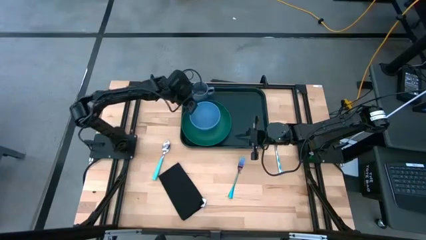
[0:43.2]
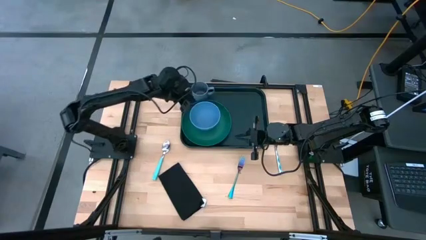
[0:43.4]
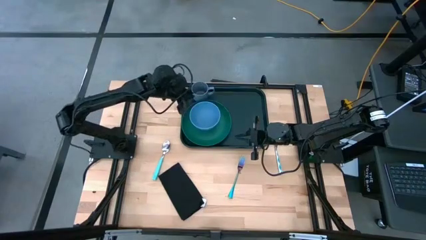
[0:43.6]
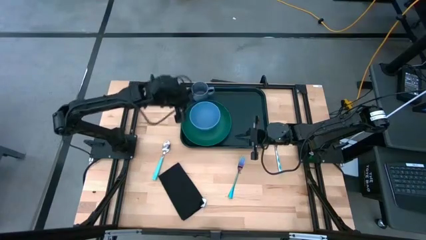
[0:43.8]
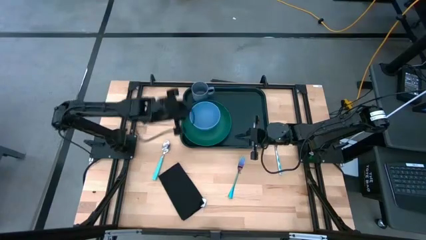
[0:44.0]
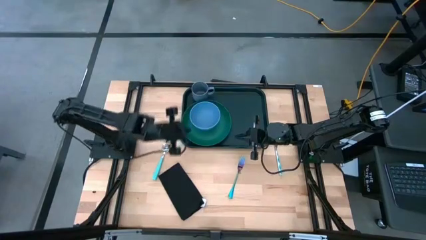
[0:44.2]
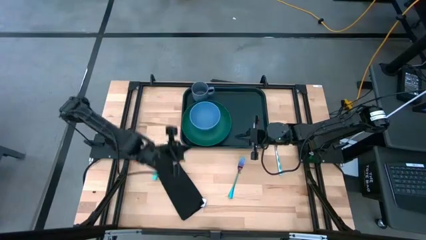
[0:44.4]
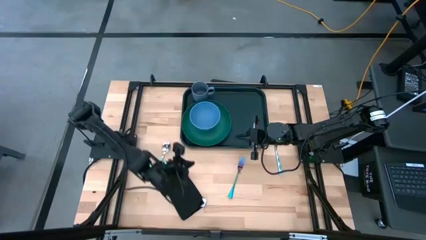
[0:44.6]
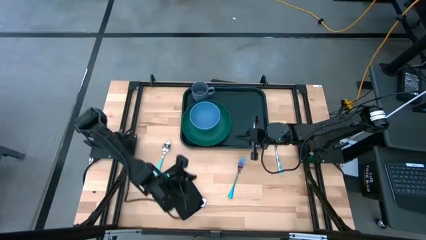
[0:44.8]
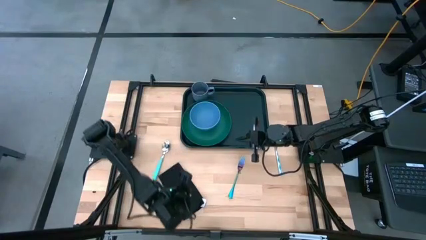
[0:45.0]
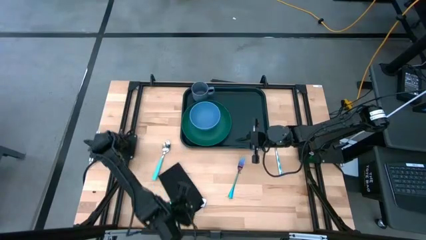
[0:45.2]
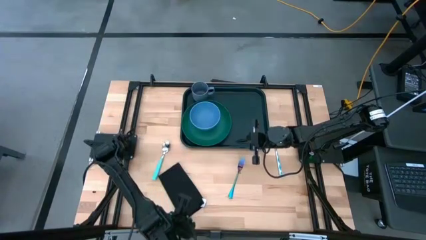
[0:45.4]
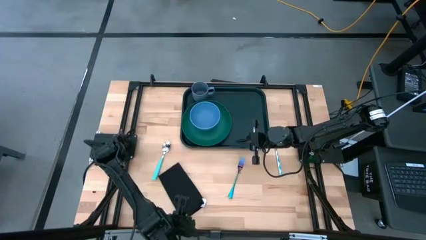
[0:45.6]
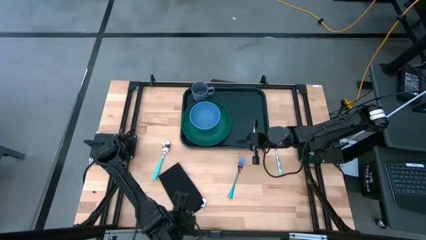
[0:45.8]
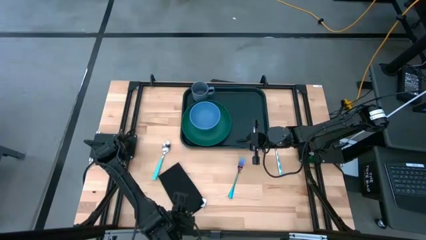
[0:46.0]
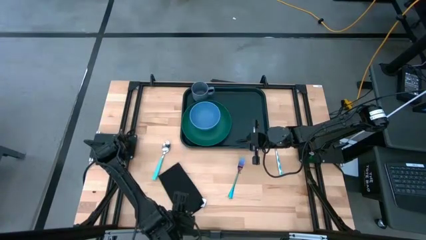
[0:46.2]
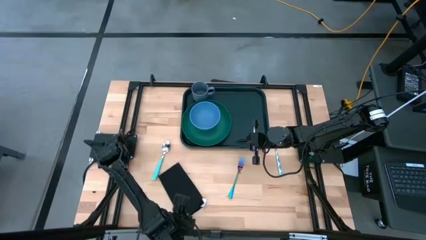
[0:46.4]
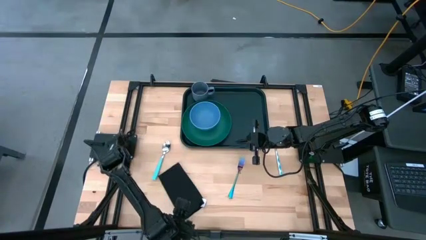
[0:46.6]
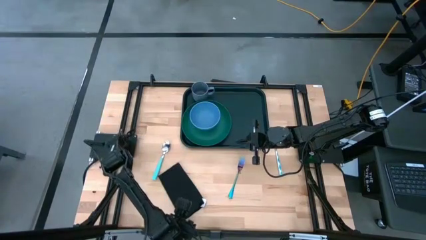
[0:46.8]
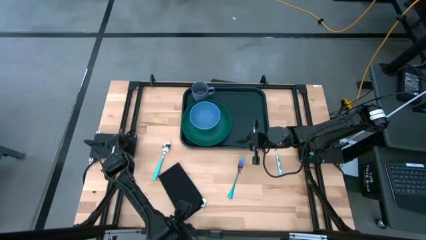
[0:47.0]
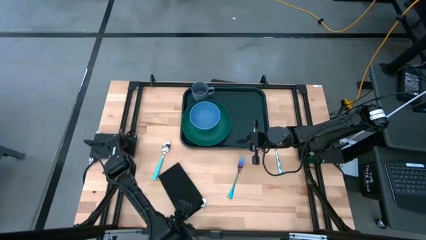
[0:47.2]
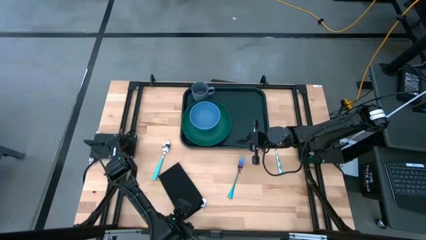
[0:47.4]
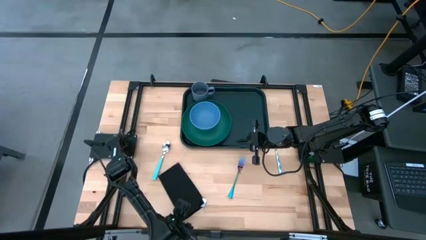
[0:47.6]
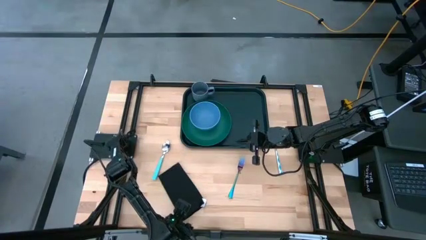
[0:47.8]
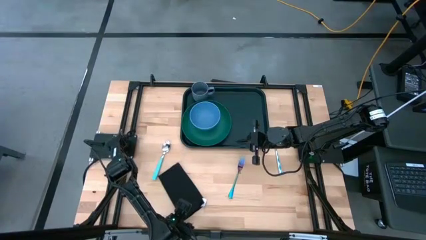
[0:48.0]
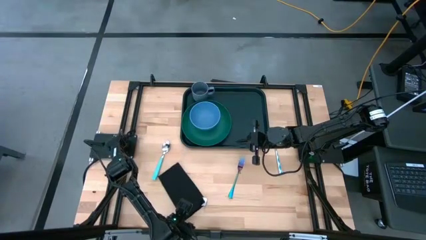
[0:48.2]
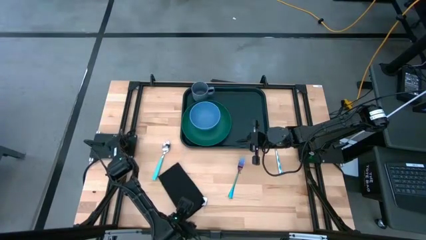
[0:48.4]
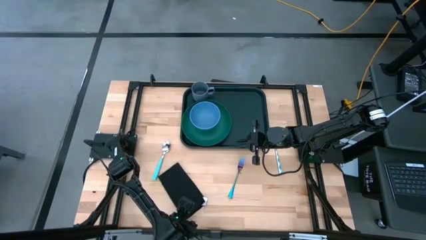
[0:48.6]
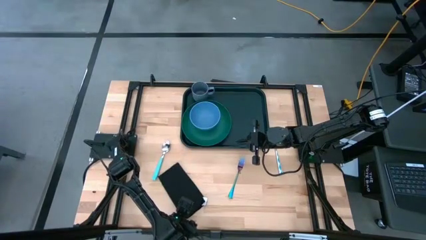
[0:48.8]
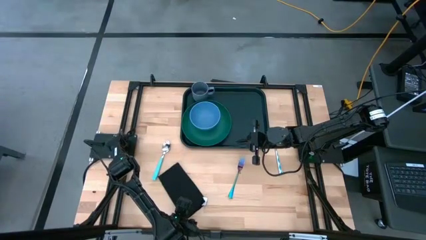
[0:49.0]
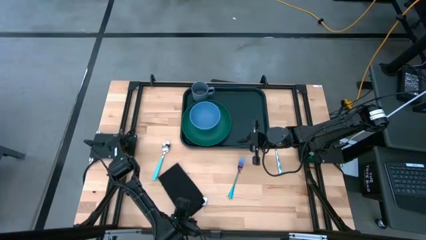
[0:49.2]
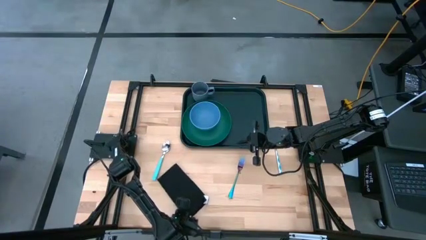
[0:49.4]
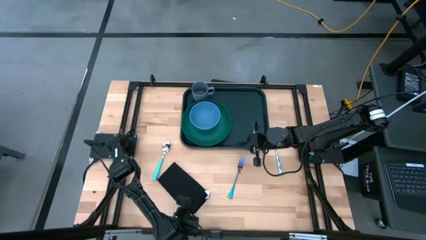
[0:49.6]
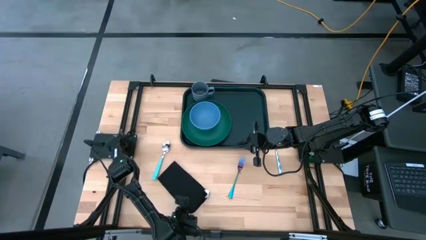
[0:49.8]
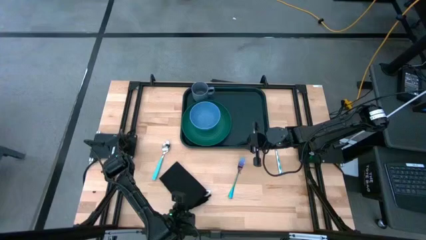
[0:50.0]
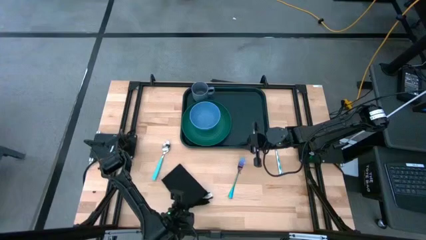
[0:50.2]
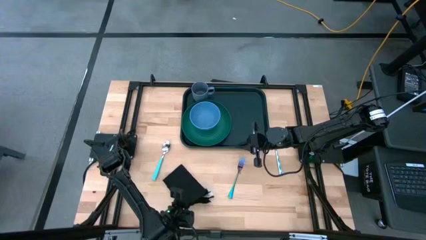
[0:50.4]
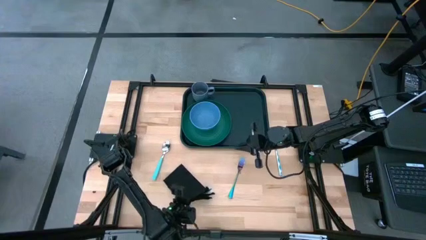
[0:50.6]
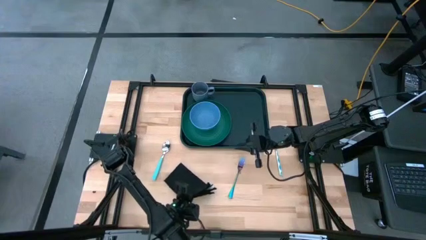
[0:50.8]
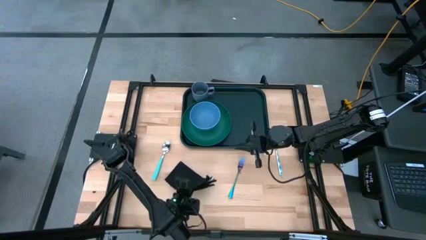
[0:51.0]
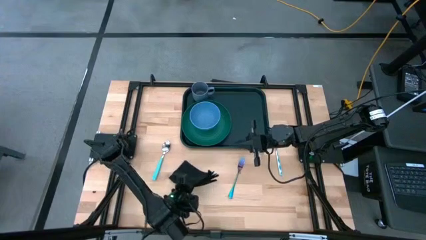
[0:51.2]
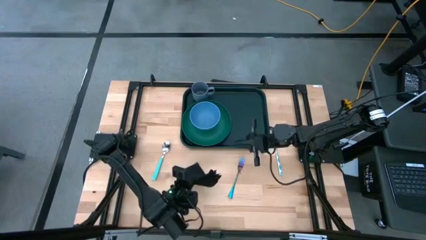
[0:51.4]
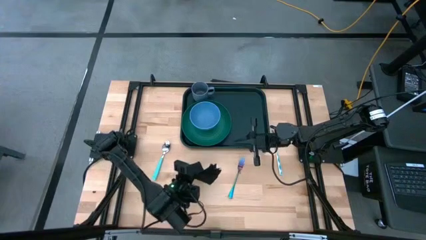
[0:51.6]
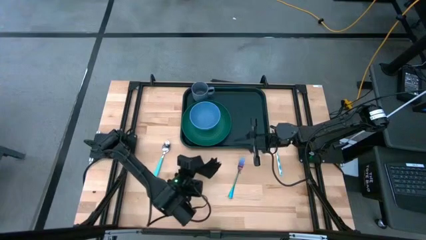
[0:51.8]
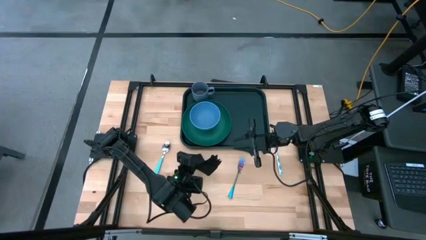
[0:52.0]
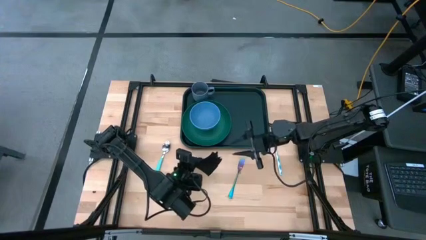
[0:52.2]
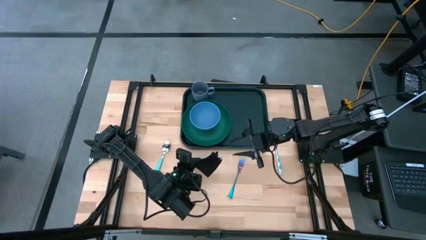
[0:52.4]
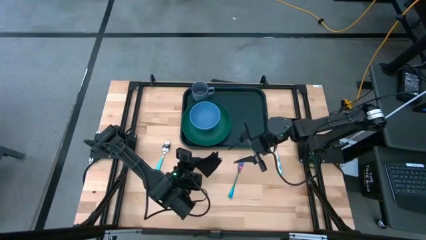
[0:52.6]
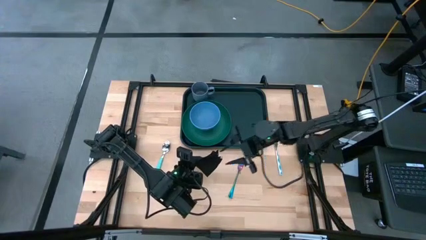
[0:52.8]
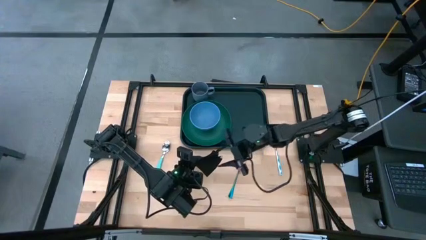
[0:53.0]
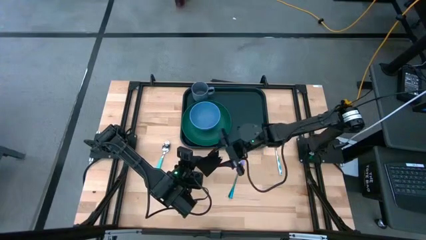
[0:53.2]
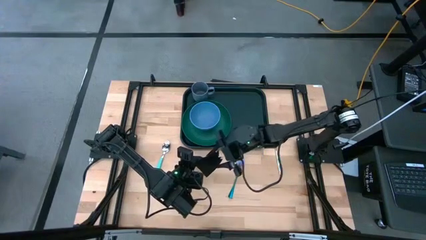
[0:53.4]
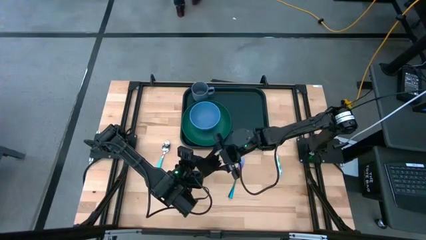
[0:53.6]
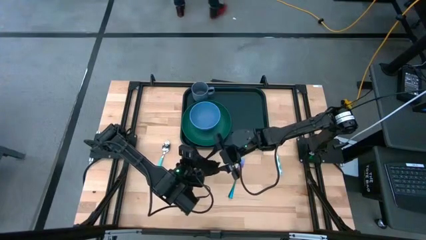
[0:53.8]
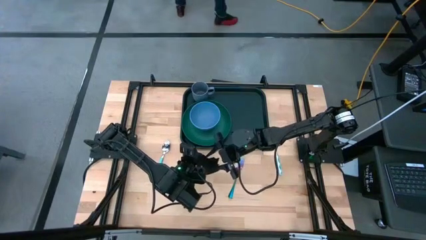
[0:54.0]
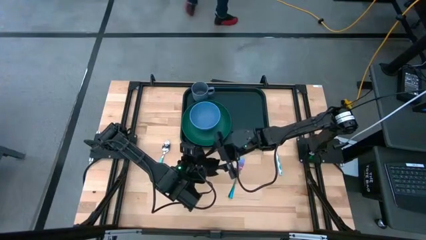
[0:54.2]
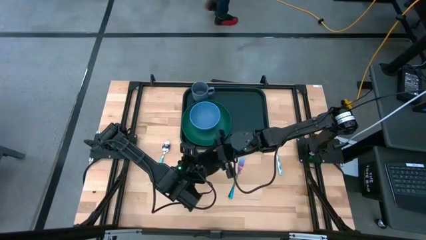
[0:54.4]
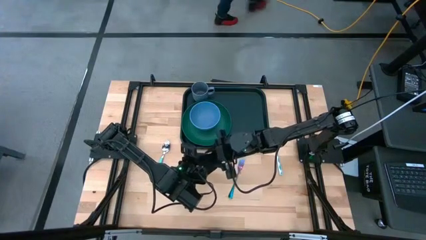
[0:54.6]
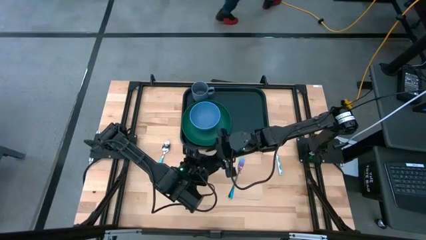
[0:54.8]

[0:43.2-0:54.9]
Task: Set up tray
Put the black napkin to the right of the green plate on the dark green tray
